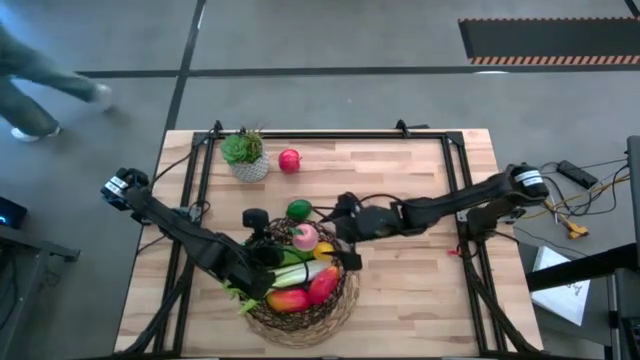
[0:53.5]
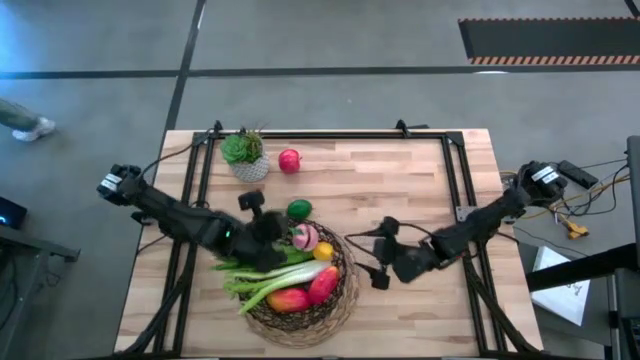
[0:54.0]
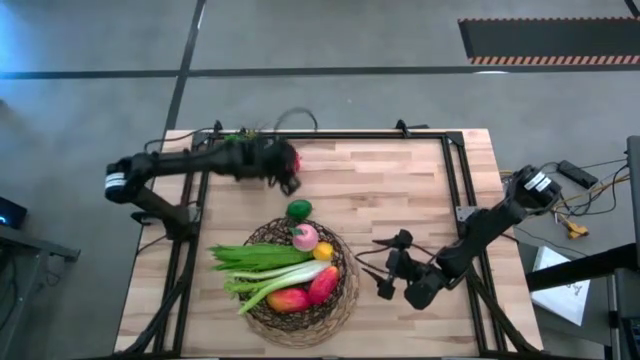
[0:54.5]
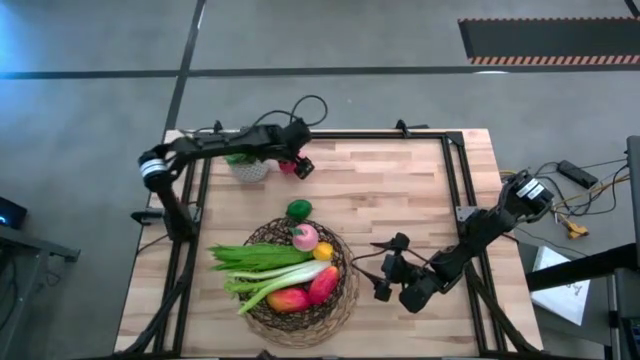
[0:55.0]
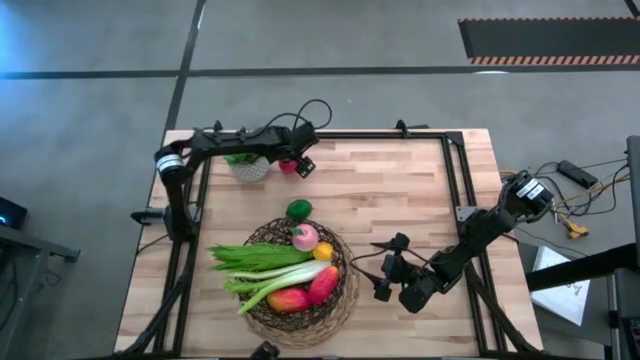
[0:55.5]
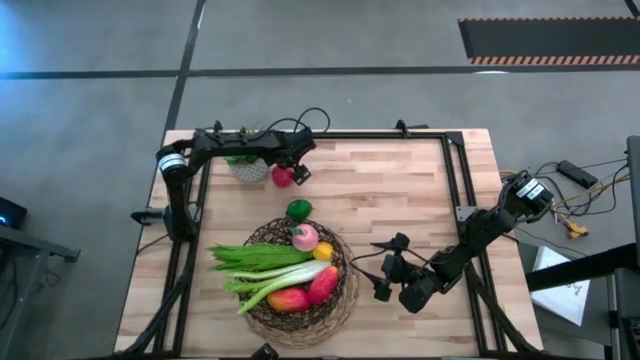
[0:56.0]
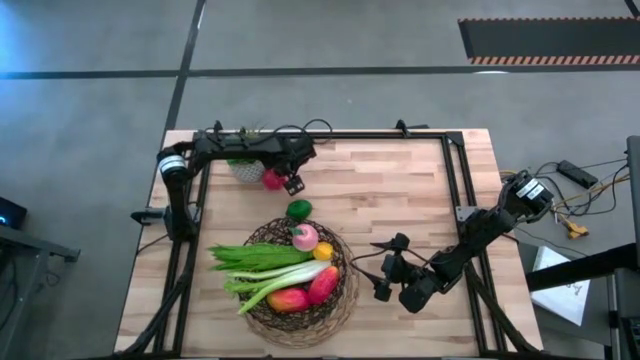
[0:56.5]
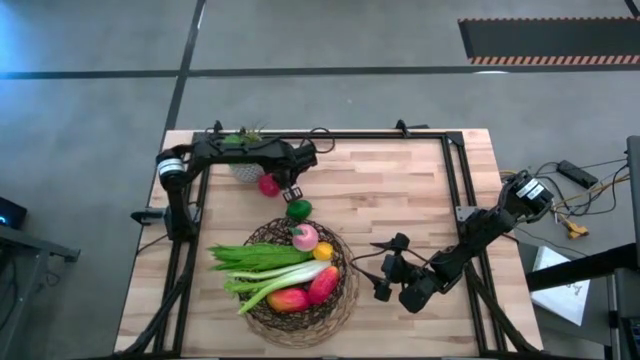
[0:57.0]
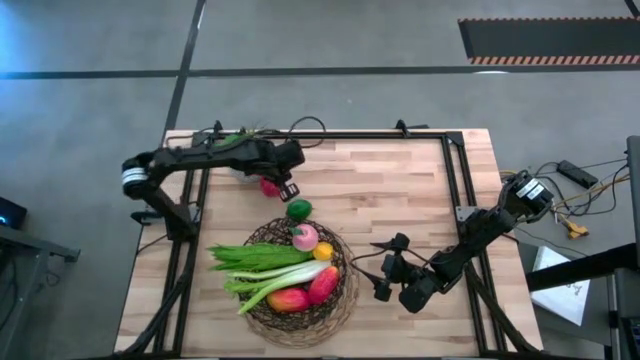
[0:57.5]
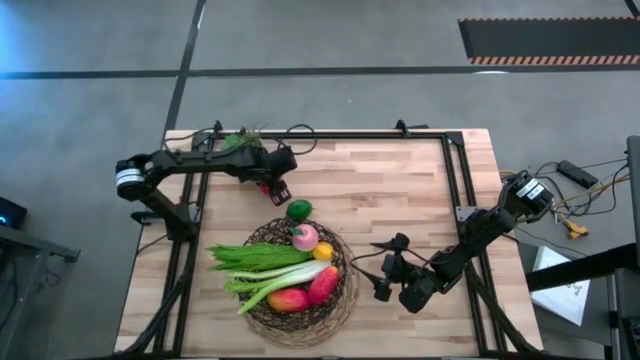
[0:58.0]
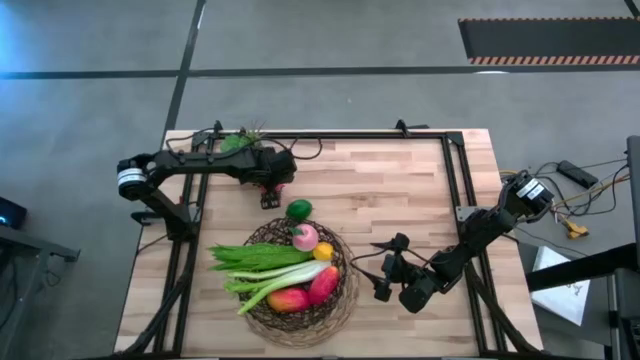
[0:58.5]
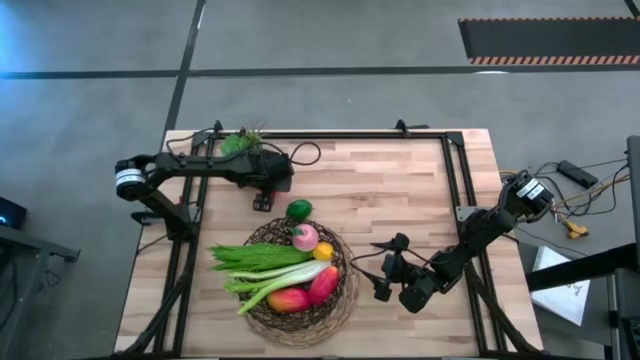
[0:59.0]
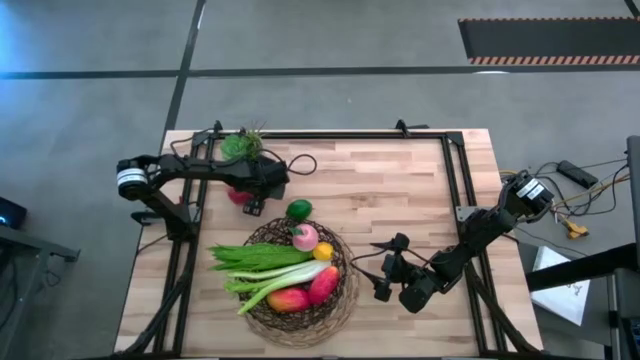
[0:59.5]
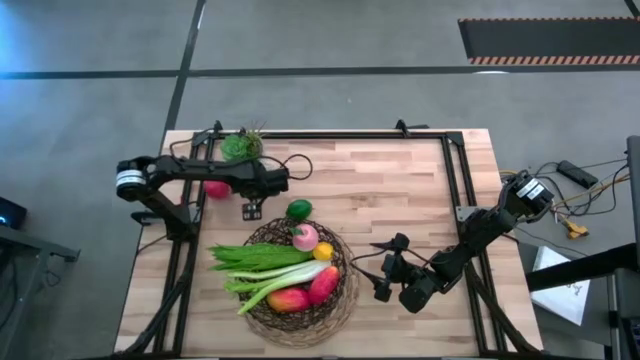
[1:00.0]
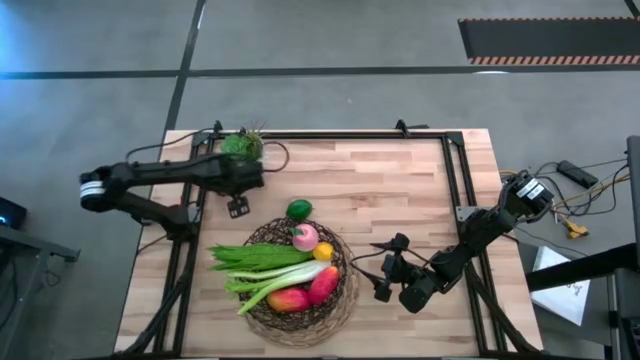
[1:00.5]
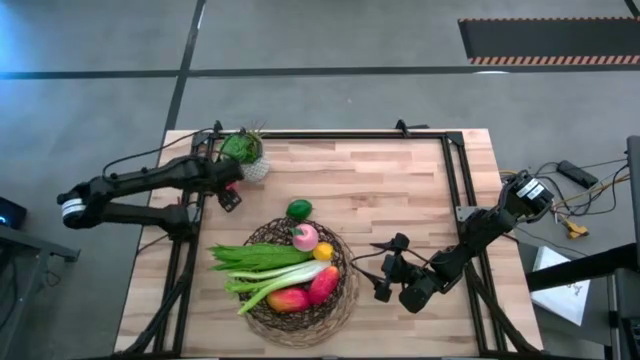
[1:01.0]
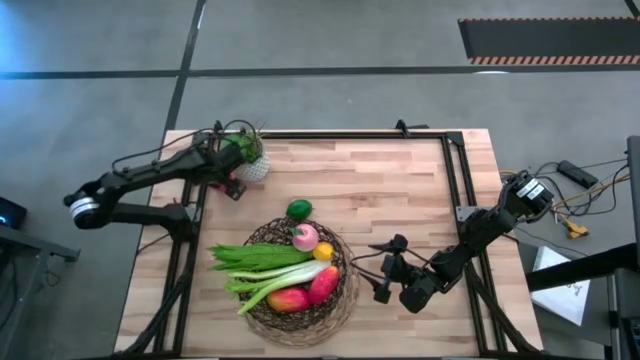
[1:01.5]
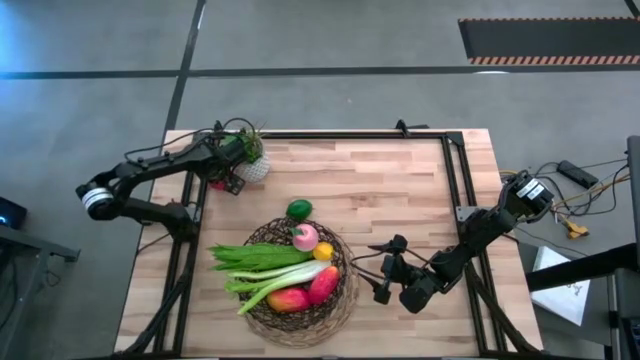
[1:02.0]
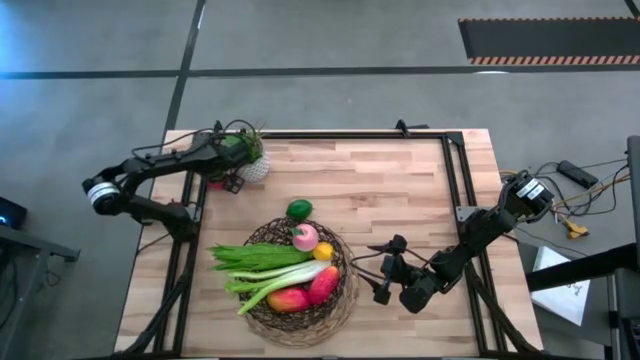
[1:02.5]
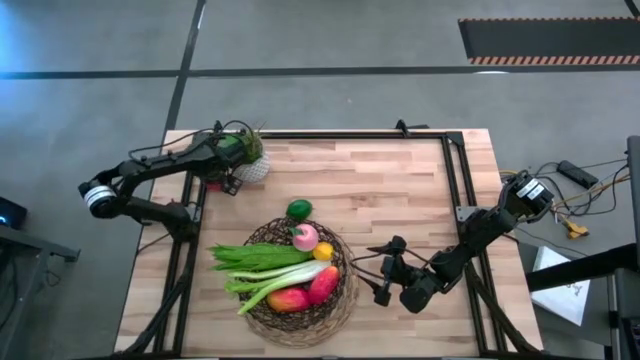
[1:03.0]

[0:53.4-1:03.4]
Task: Build produce basket
Put the apple into the mesh basket

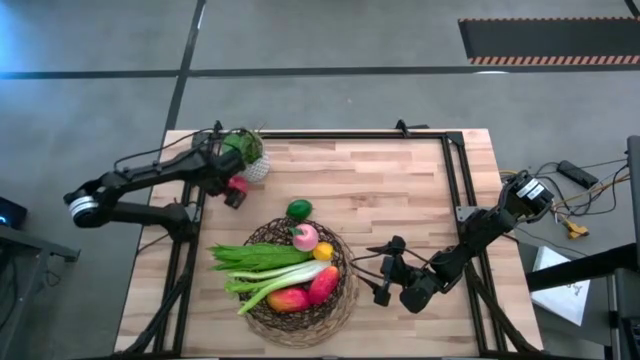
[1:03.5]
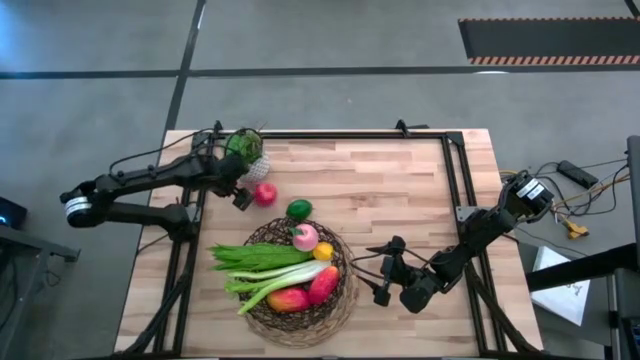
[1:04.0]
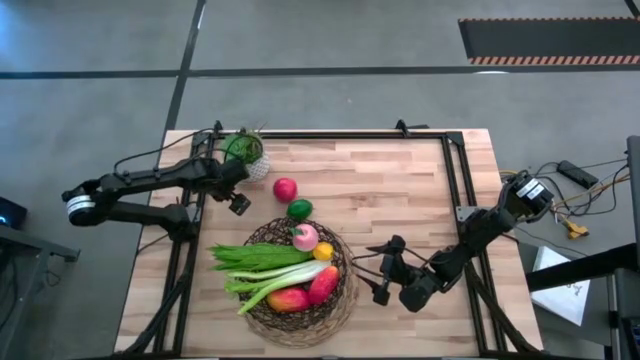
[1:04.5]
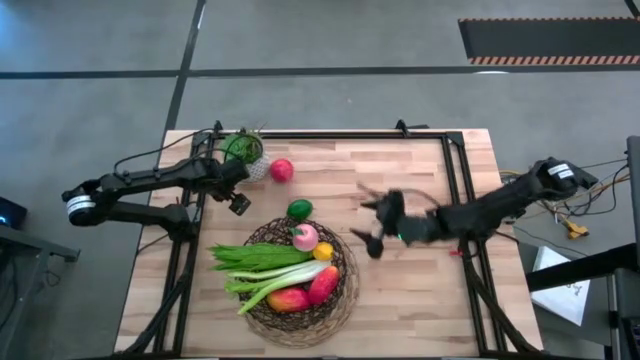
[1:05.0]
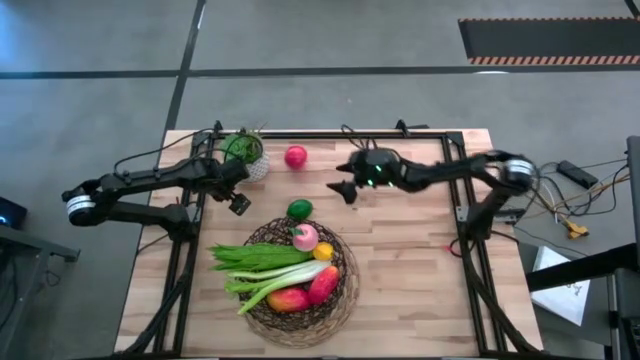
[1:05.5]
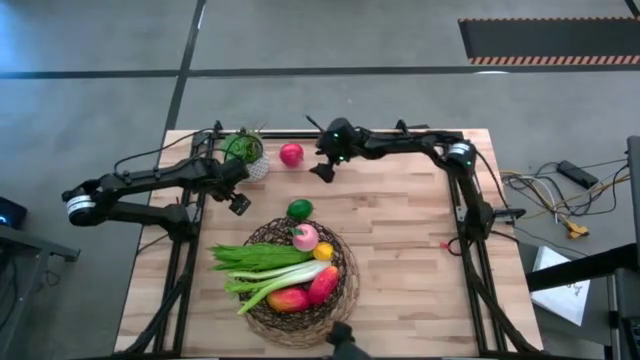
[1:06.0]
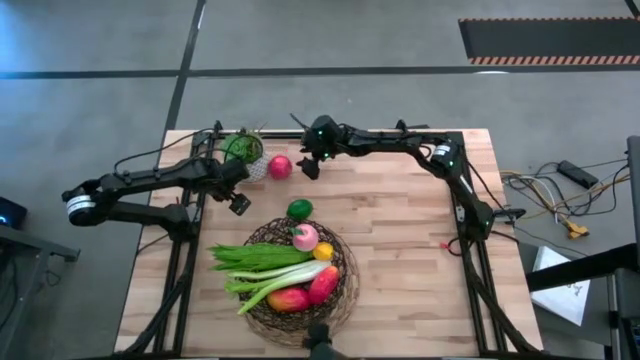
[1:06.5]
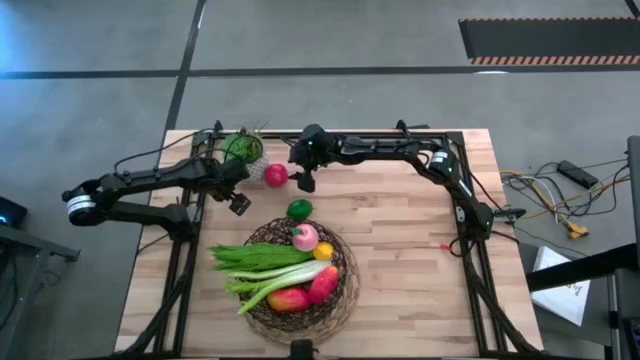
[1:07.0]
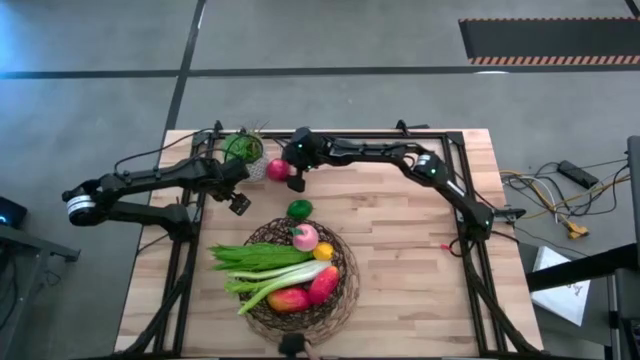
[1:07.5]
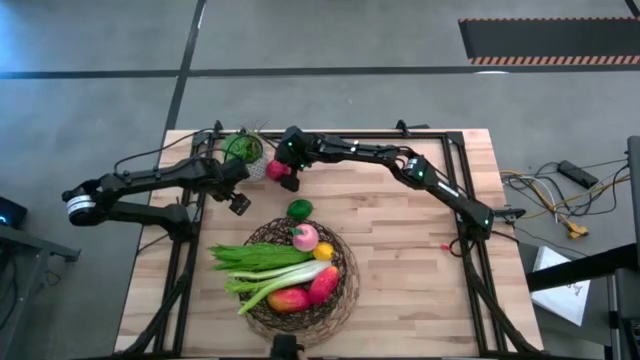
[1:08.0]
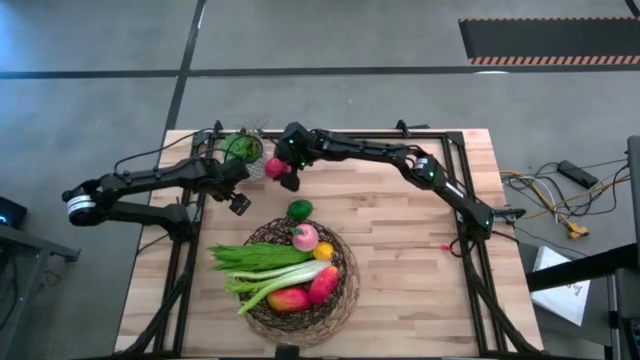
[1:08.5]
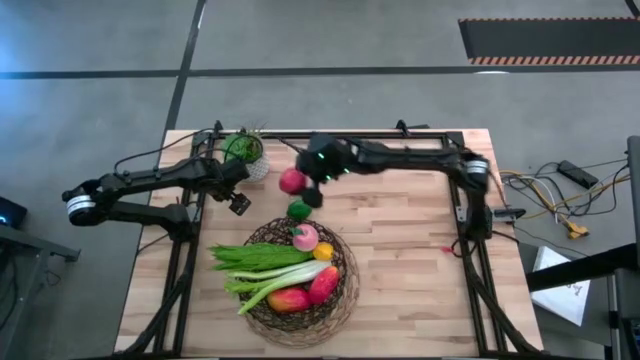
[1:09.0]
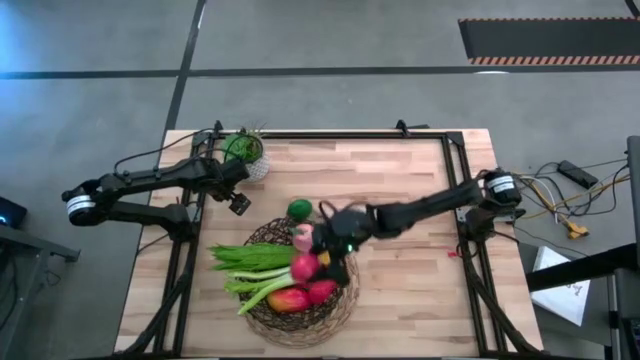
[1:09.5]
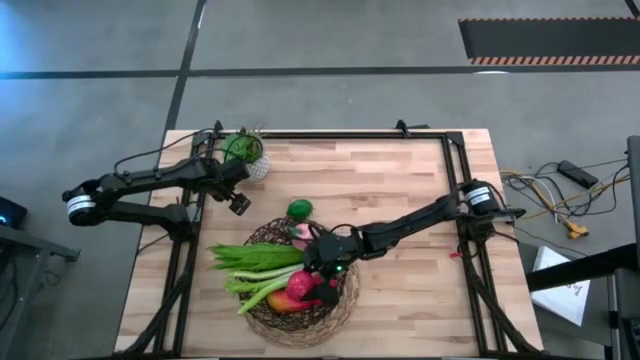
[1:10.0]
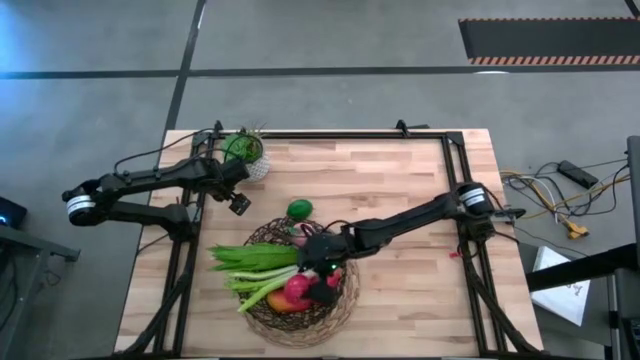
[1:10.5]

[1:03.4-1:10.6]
Put the apple into the mesh basket

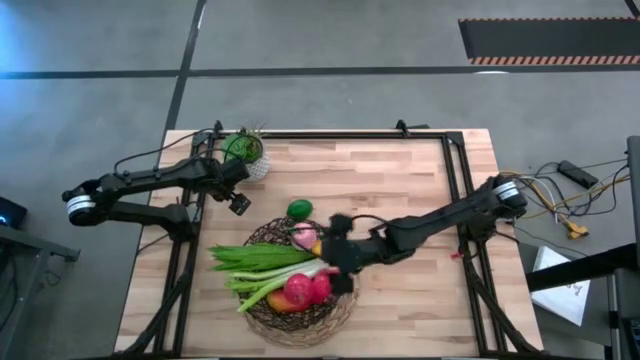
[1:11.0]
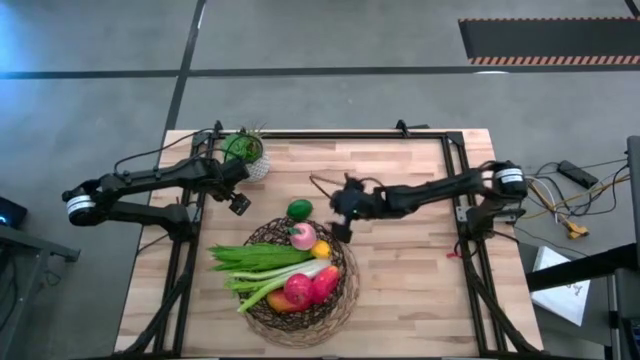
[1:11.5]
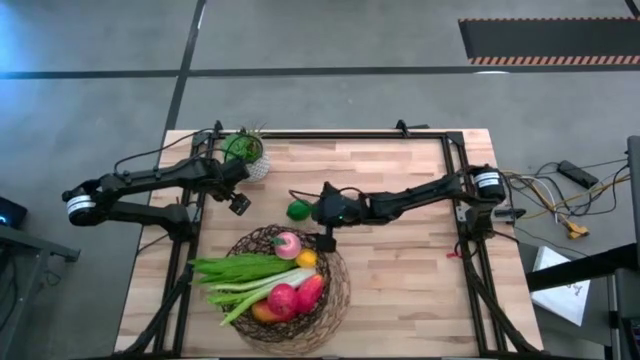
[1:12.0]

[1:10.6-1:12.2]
Adjust the mesh basket

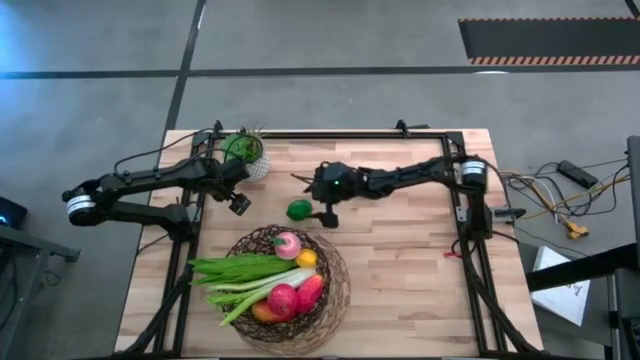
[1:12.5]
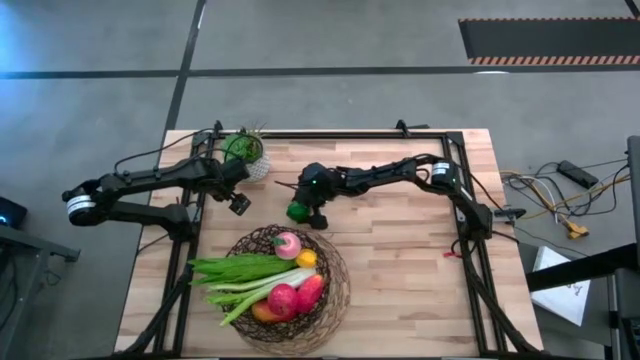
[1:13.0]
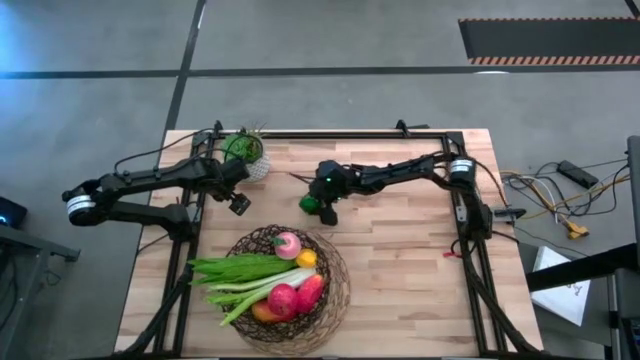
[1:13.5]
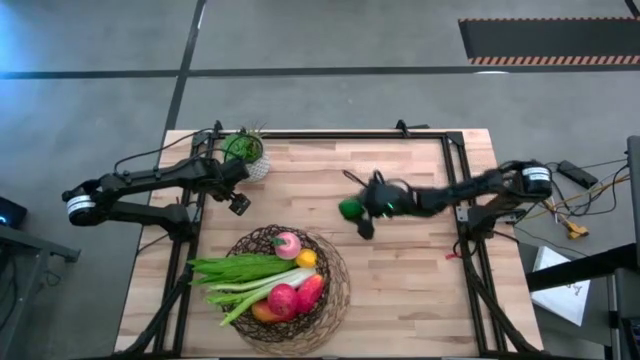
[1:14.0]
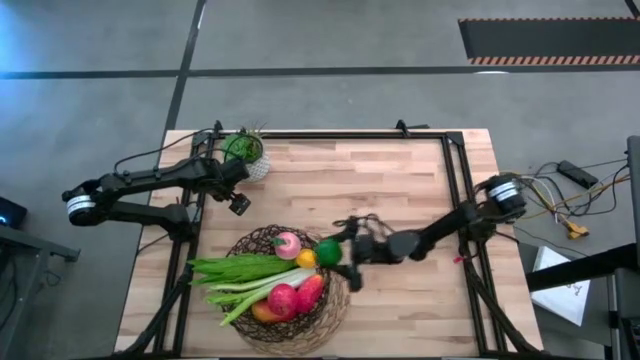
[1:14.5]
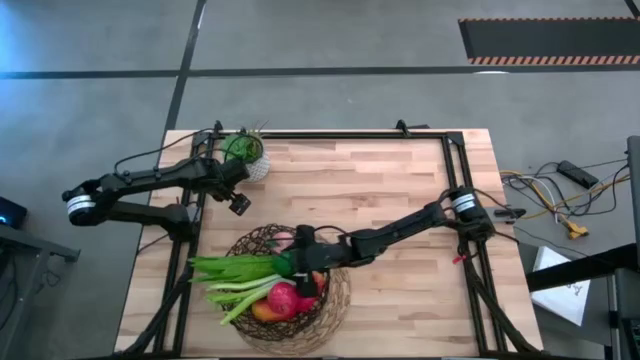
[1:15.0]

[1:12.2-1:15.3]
Put the lime into the mesh basket
